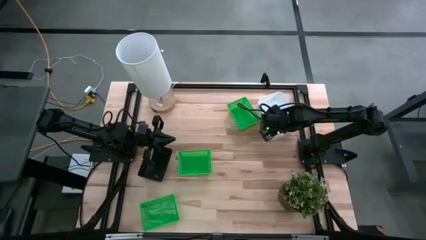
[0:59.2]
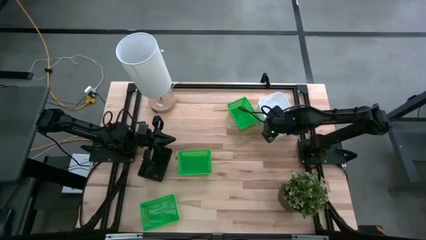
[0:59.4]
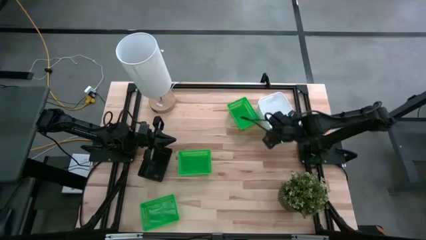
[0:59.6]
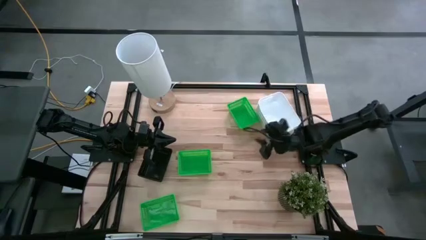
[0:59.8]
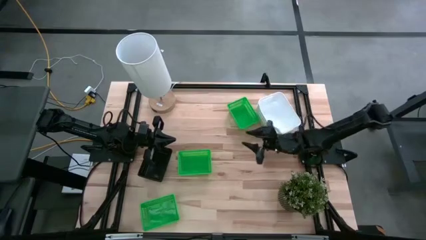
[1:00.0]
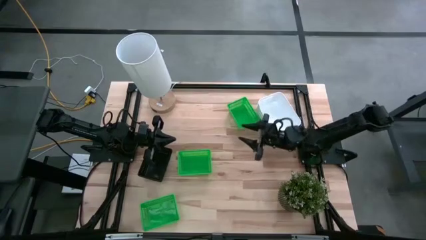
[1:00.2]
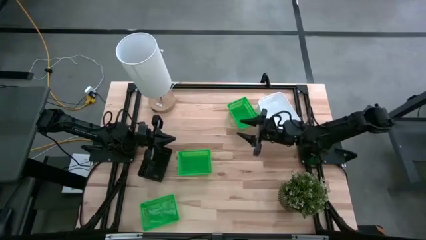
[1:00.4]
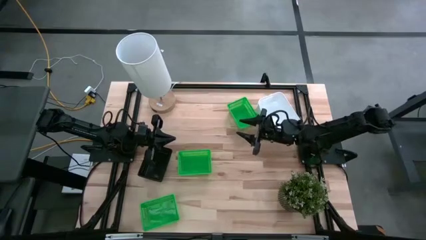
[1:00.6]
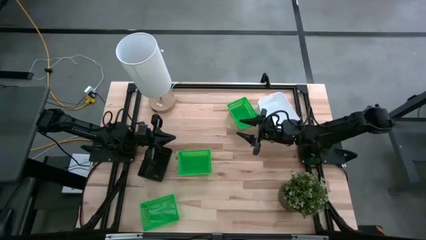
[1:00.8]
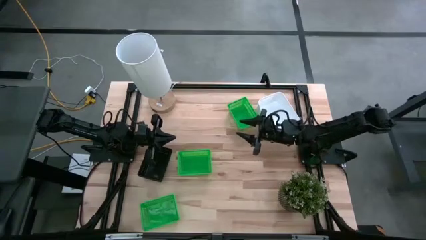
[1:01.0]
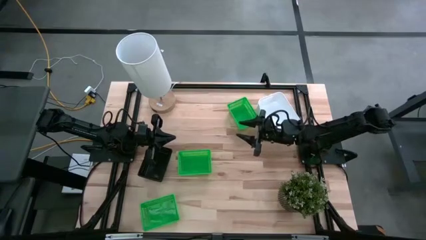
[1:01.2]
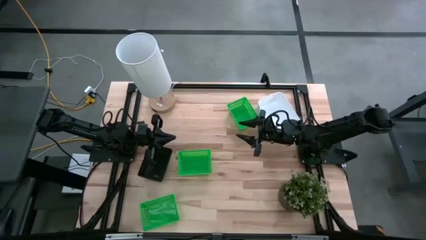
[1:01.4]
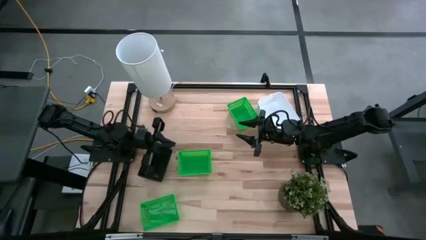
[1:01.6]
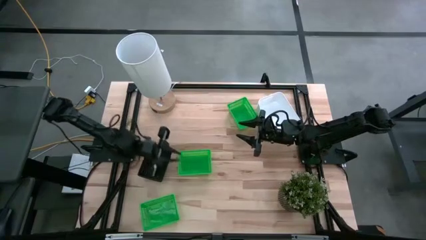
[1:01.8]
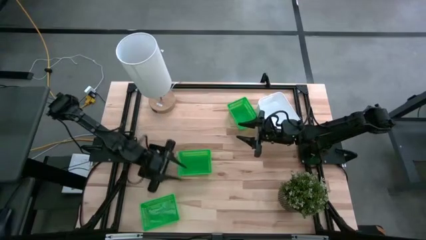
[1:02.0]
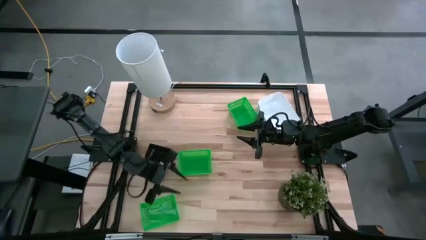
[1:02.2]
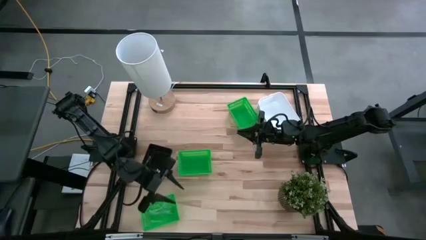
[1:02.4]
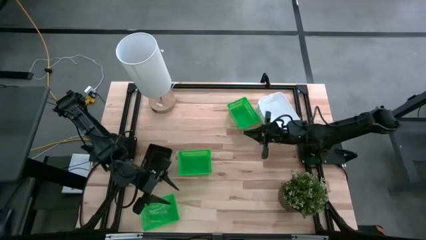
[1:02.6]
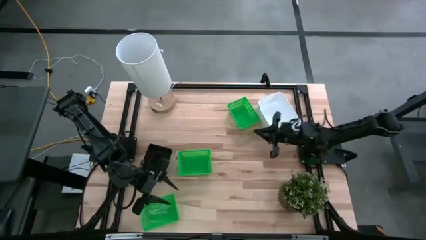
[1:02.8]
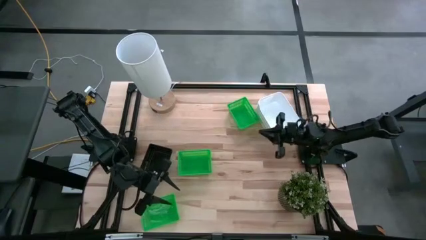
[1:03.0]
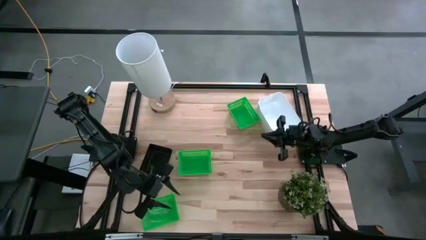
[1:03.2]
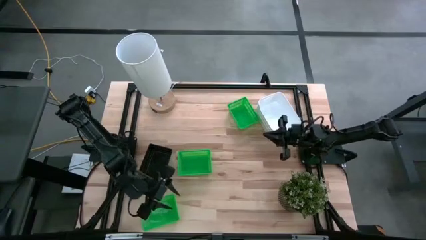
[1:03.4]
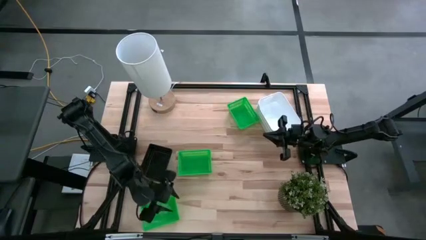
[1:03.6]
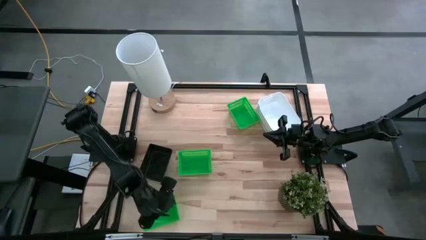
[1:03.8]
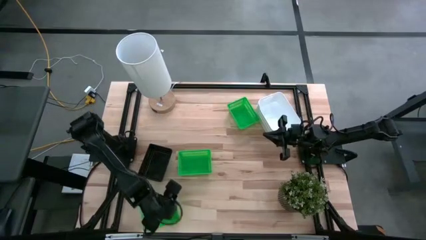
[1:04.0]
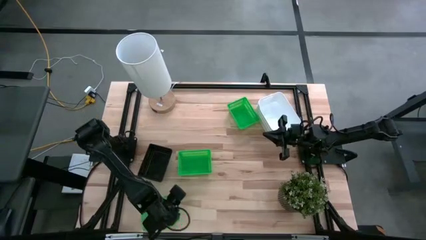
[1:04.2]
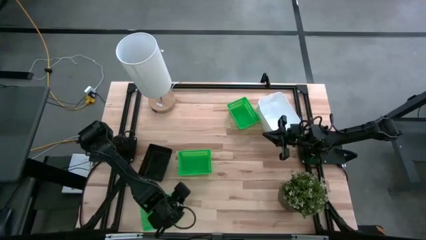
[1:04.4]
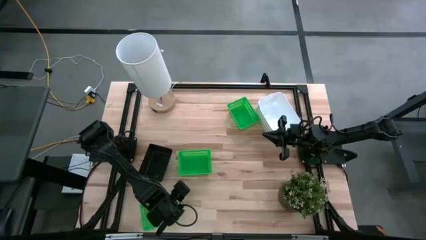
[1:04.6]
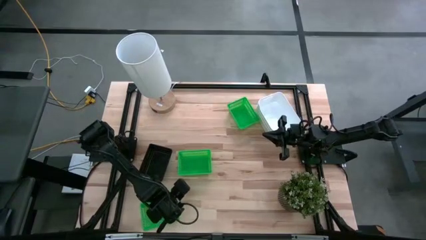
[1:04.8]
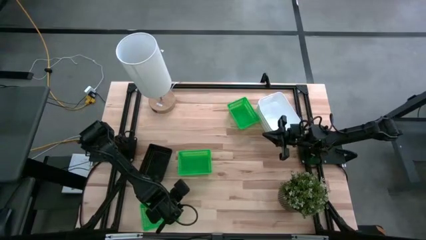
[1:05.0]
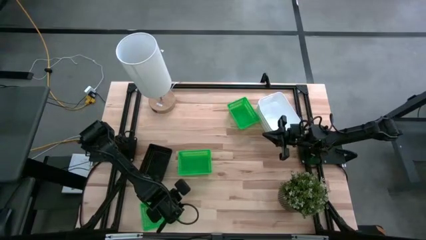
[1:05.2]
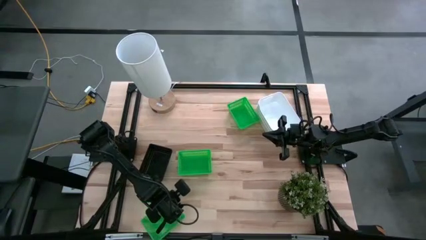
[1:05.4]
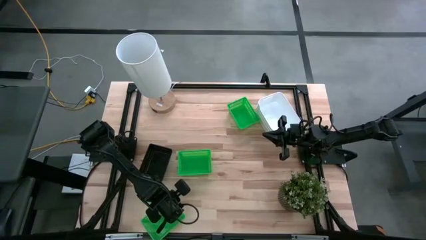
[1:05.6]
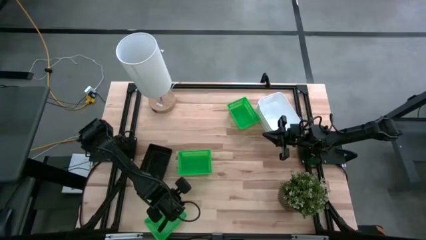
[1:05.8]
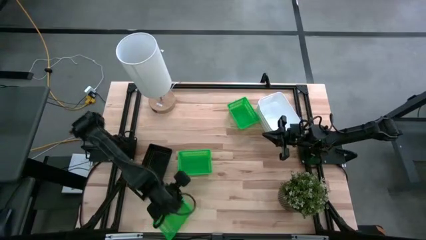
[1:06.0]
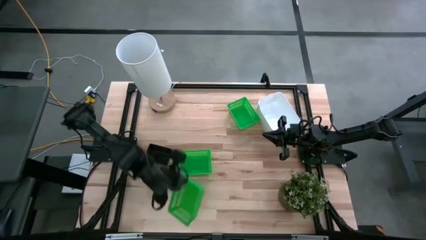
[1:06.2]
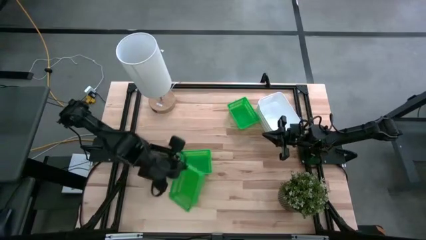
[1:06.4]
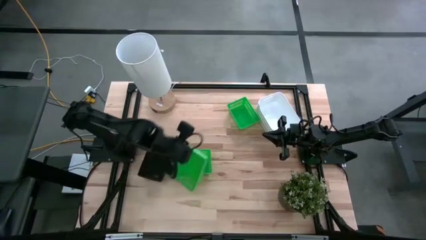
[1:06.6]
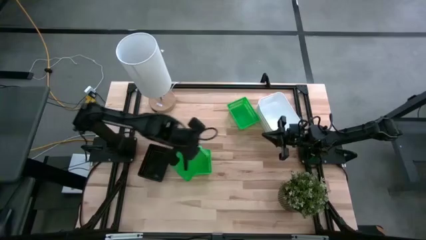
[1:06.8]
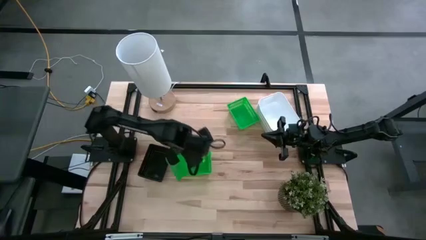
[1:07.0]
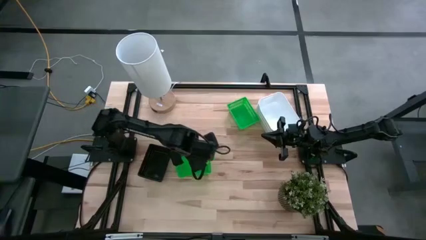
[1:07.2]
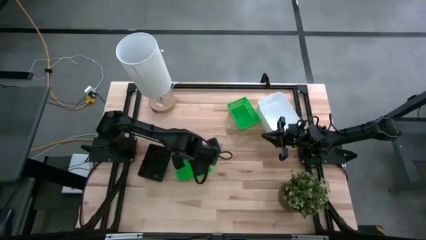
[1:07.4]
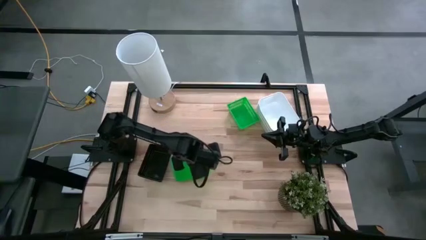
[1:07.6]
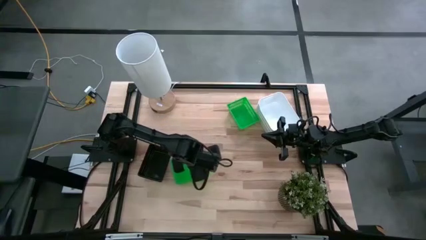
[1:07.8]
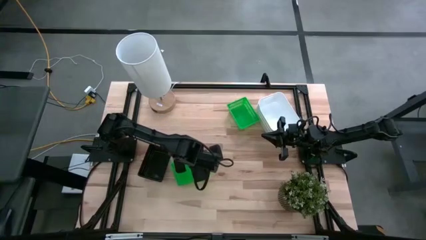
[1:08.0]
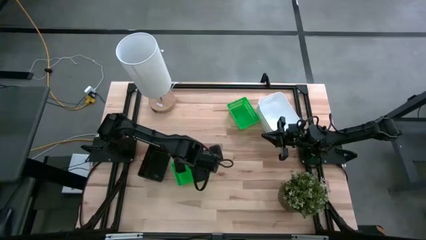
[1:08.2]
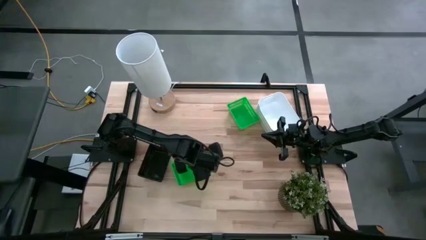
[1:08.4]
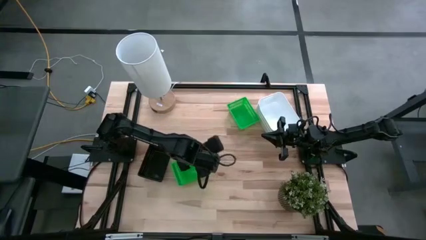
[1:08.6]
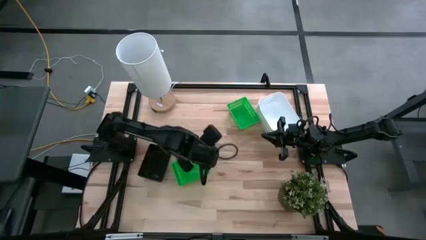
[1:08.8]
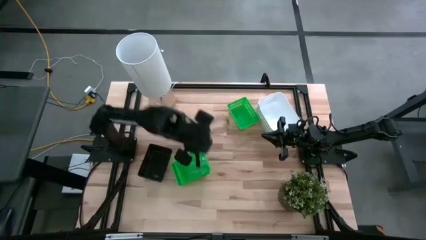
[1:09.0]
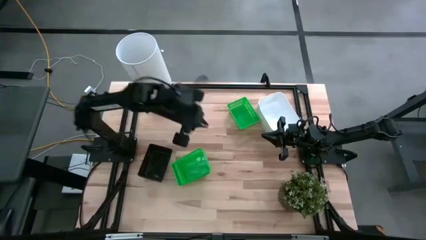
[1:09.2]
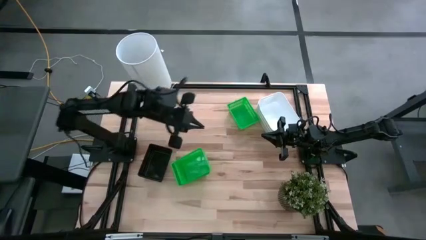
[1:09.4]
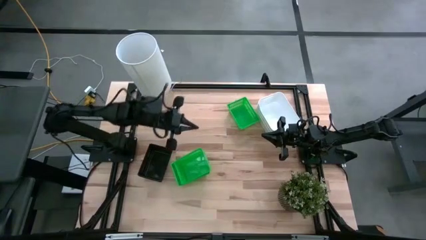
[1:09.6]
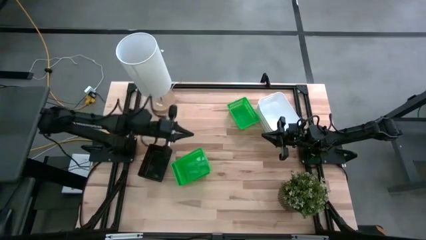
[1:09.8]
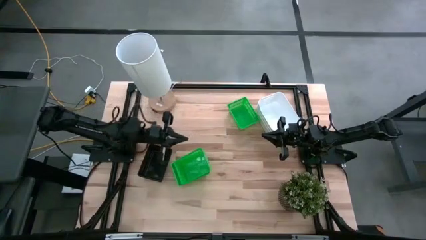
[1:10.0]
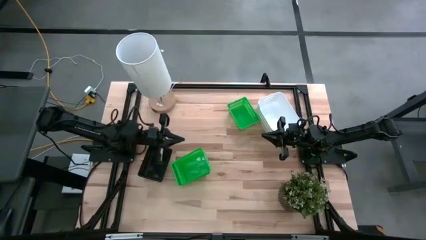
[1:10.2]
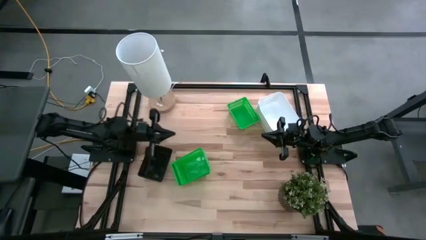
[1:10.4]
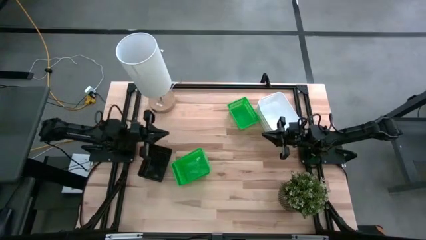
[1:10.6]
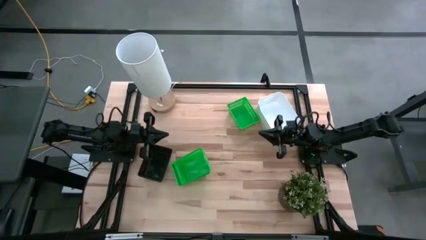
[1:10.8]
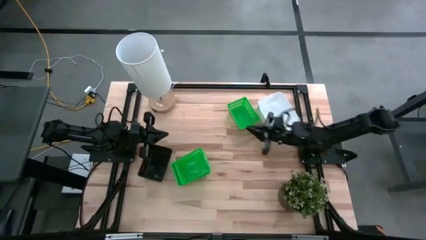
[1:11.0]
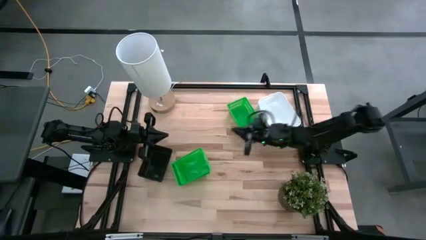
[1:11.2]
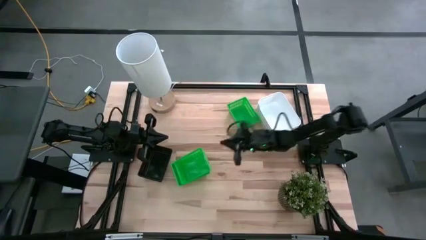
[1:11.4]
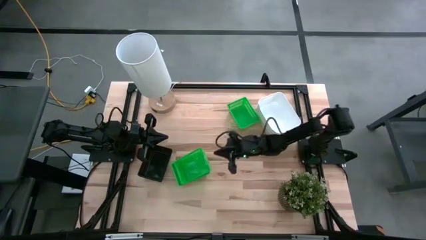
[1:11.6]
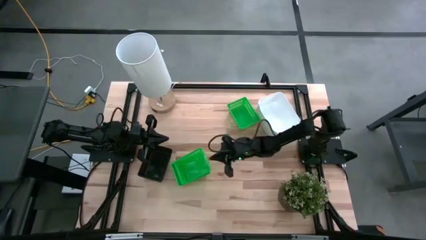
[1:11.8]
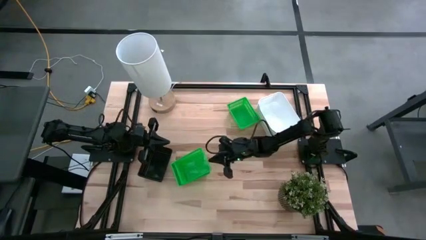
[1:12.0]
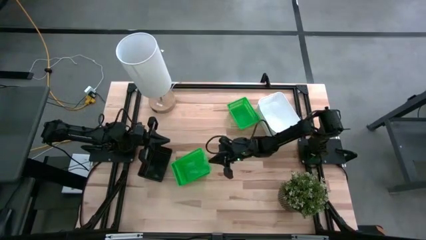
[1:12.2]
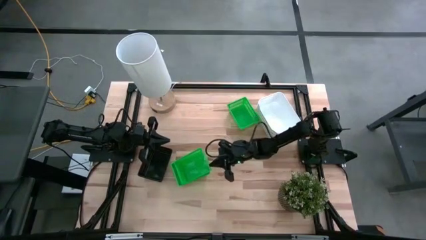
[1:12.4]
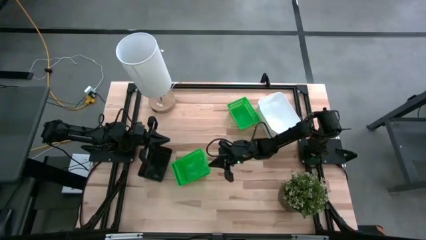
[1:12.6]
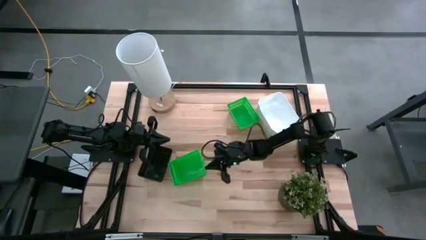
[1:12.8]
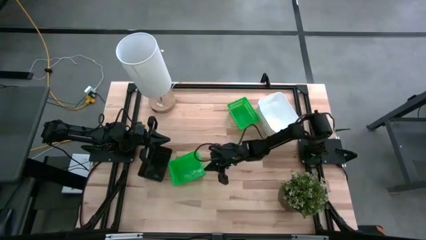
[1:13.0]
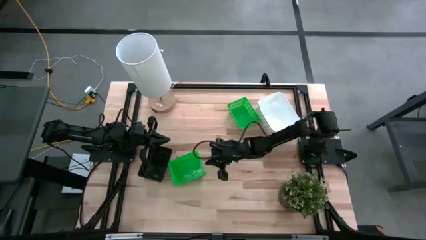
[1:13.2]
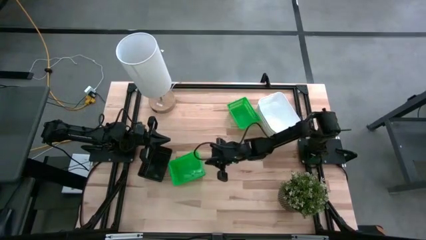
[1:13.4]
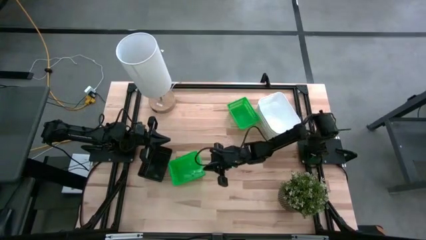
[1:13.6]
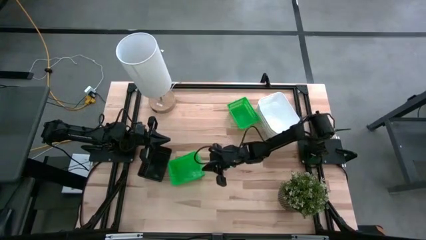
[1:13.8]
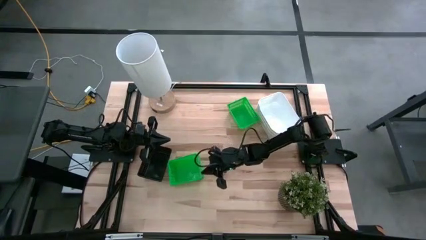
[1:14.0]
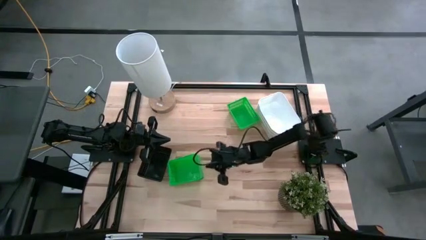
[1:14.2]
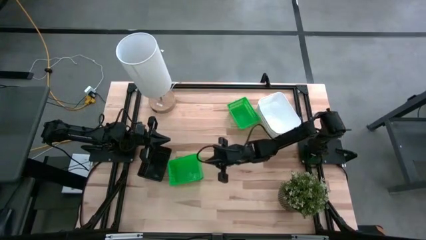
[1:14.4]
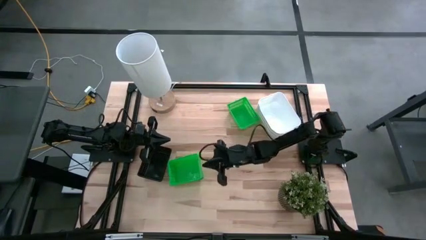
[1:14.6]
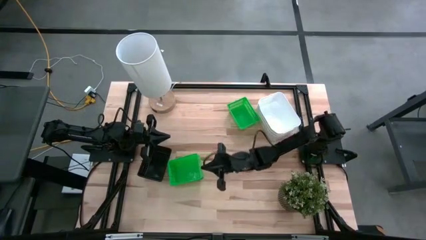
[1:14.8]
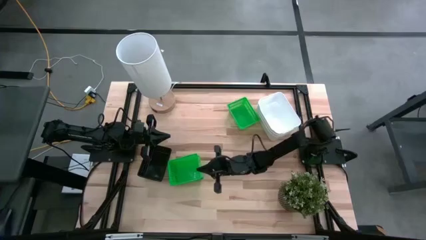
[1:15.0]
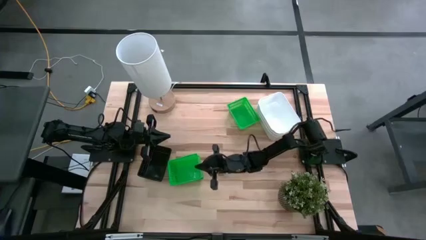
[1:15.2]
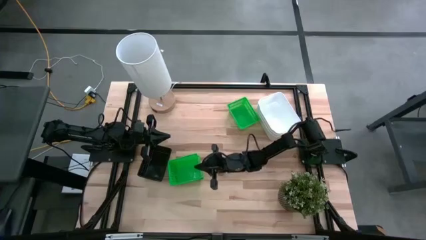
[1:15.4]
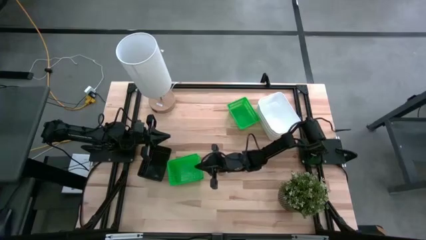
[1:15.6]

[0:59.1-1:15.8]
Stack the bottom green bin into the middle green bin
